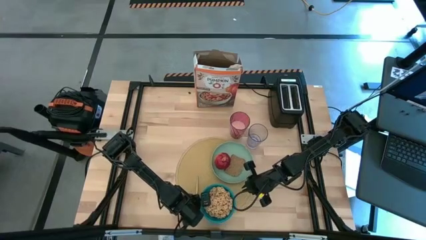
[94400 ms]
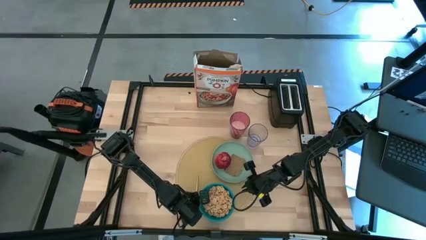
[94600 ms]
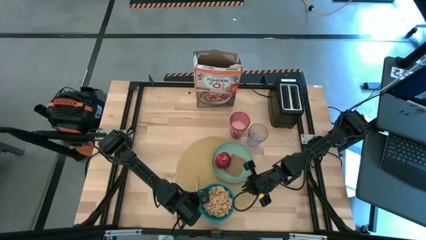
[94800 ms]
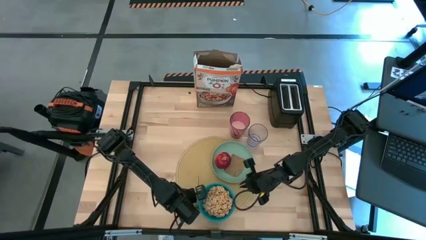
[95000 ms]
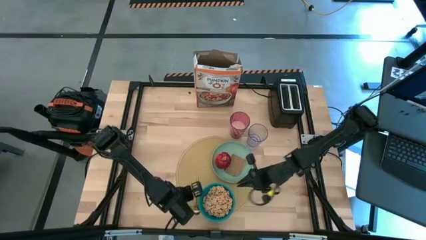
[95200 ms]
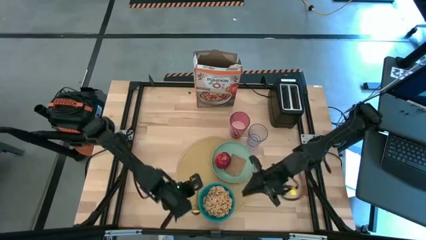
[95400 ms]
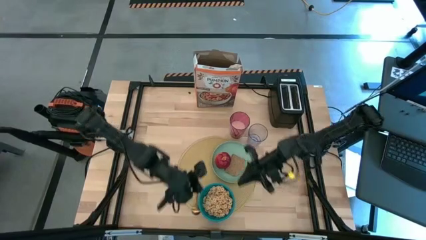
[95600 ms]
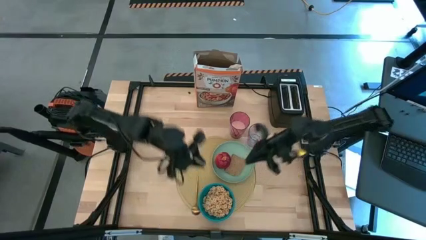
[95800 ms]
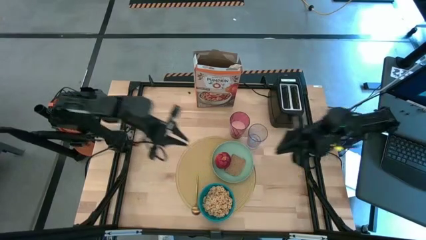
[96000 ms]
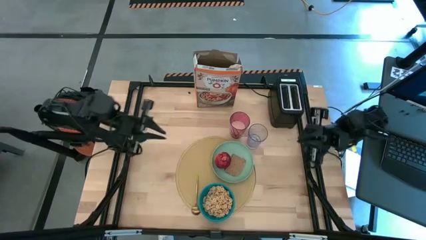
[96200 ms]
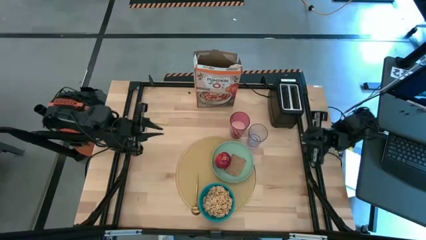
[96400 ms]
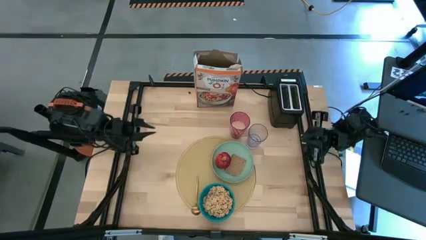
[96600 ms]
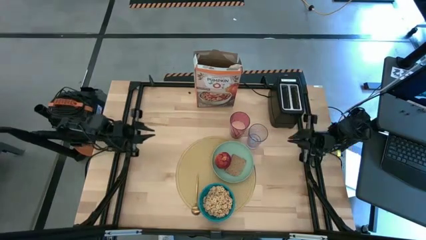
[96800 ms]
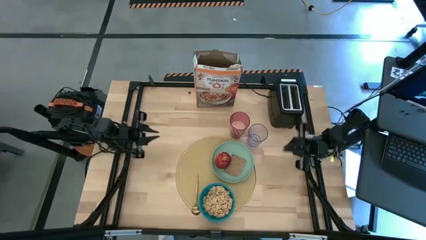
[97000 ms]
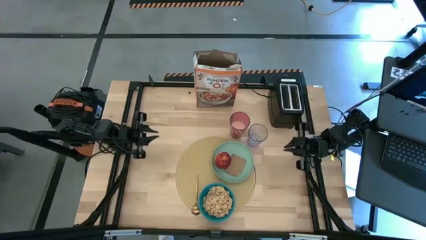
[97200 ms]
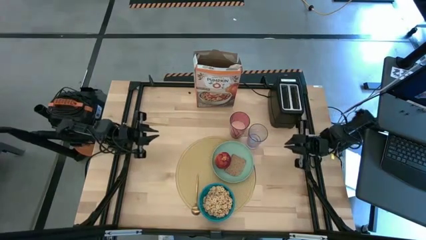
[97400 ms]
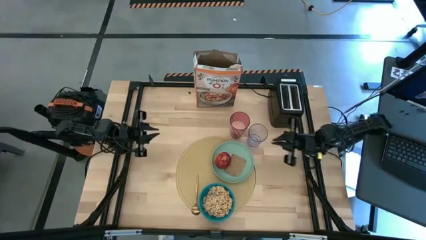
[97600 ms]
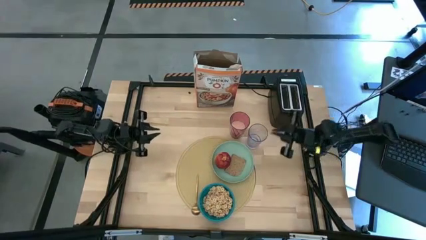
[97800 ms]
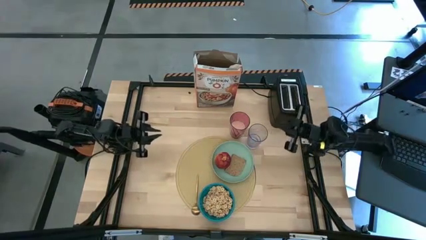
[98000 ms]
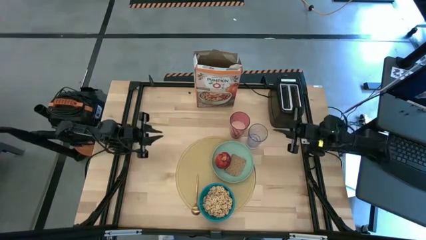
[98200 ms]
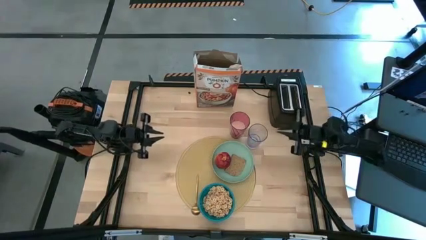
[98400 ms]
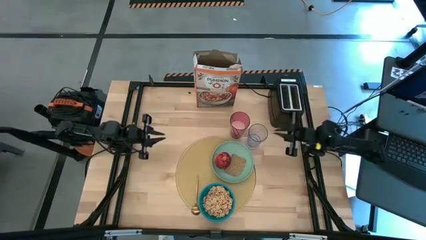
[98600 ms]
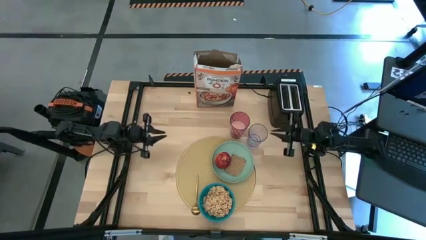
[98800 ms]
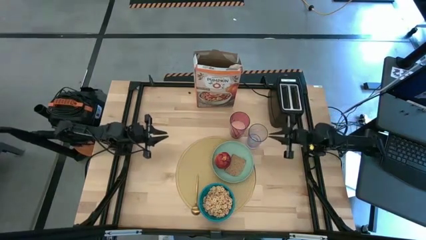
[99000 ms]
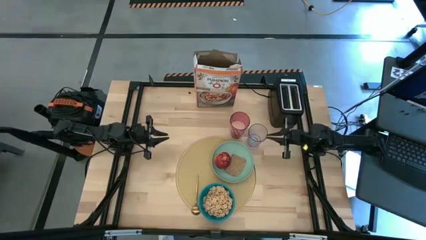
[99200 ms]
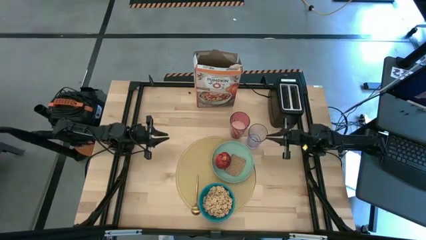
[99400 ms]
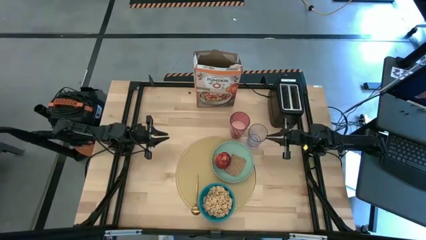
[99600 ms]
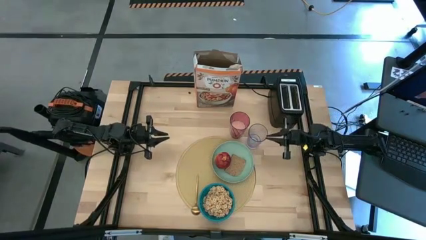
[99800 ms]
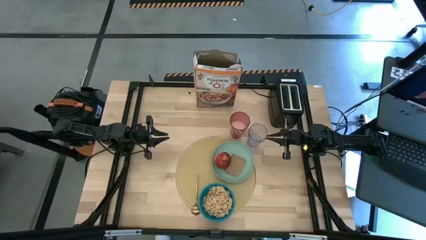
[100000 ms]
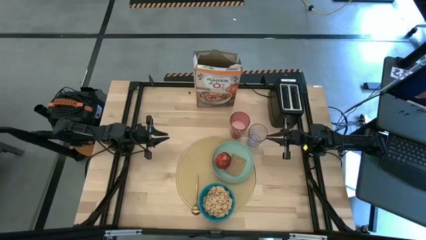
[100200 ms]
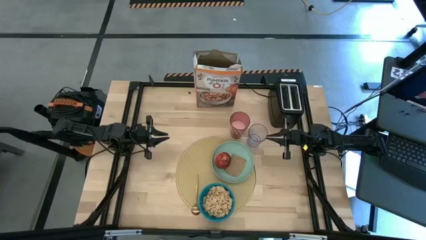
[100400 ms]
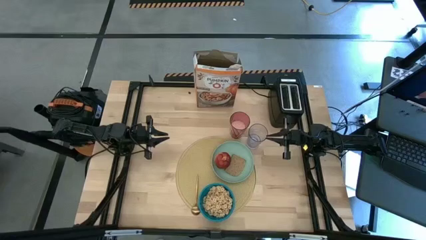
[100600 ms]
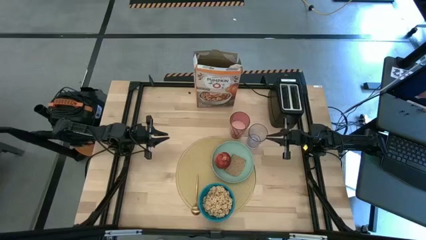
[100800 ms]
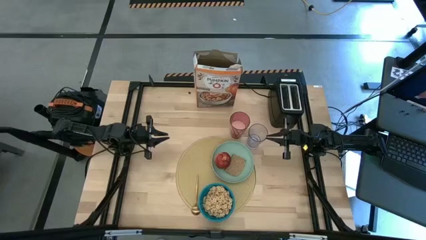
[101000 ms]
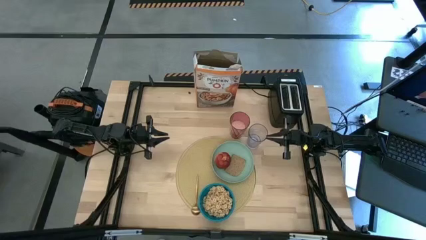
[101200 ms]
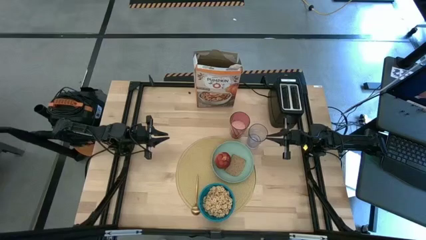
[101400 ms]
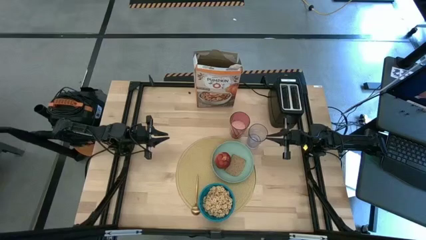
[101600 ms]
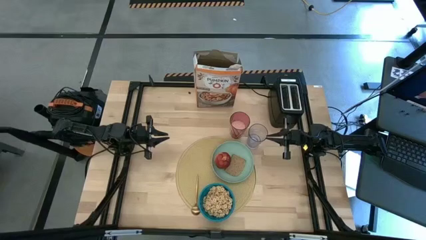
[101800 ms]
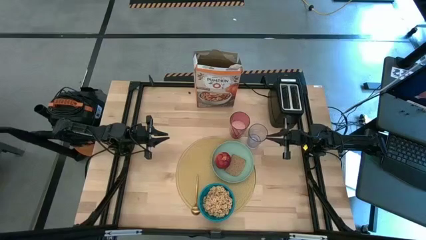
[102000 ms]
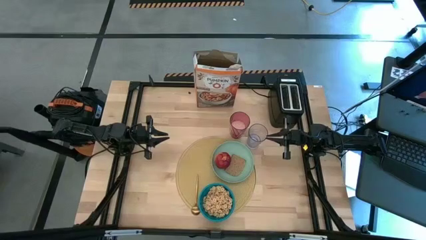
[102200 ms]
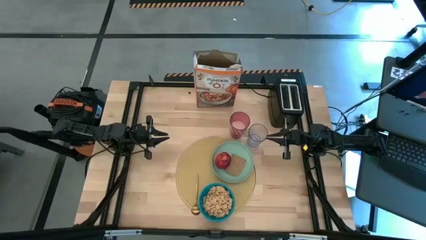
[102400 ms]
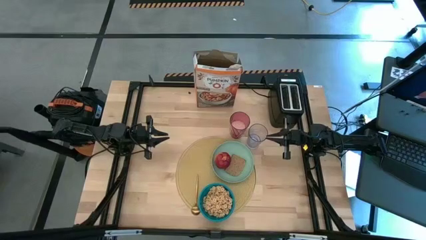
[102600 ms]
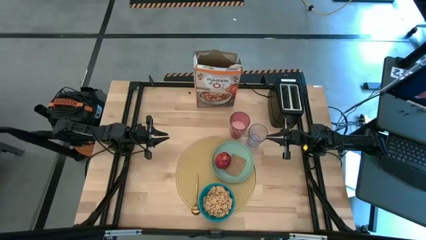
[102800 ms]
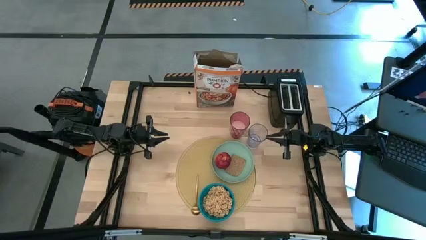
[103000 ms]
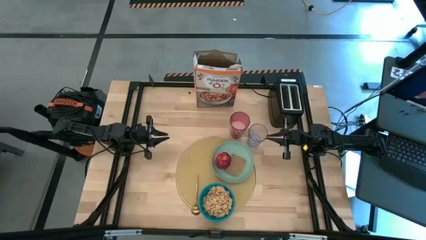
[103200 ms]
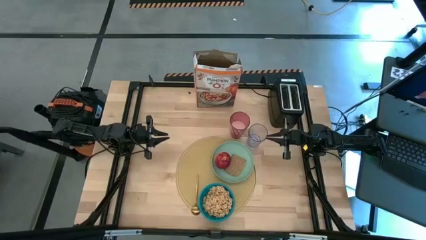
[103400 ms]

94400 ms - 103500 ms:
Task: Arrange a breakfast setting
Return to Home Position

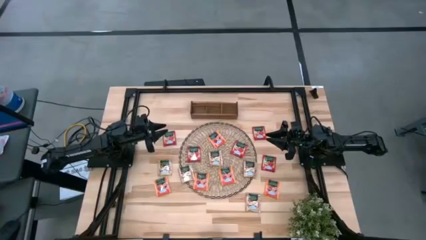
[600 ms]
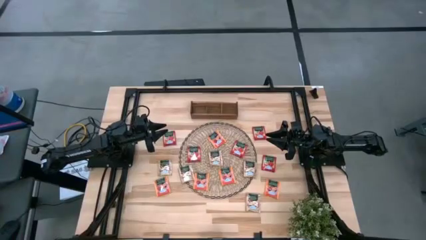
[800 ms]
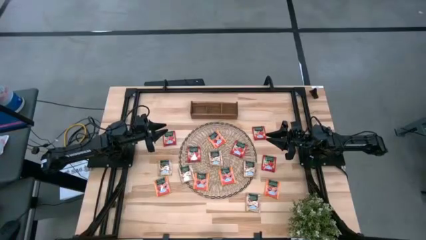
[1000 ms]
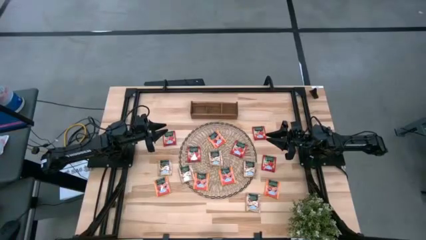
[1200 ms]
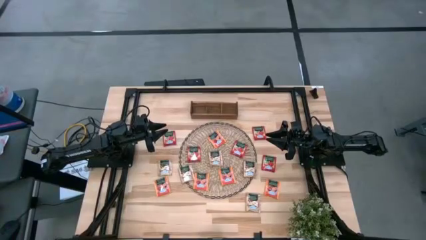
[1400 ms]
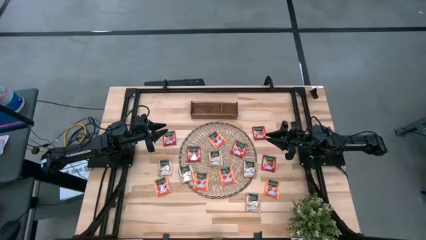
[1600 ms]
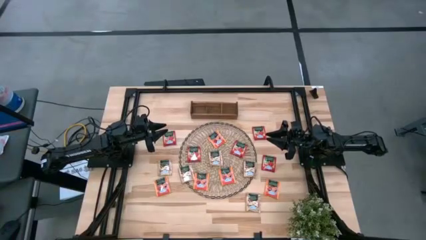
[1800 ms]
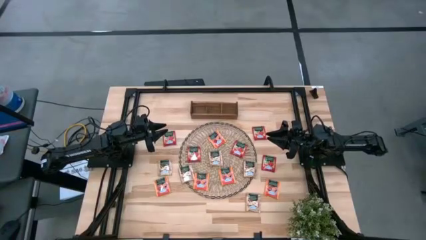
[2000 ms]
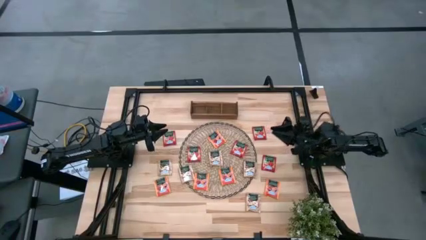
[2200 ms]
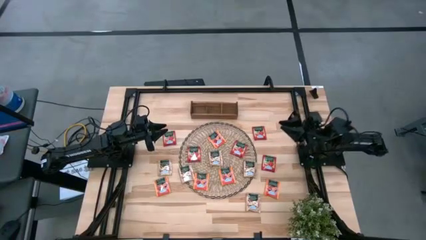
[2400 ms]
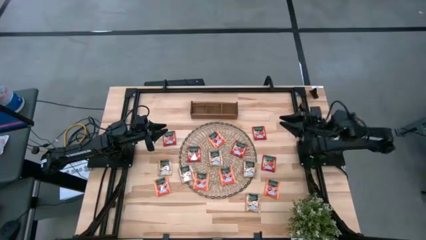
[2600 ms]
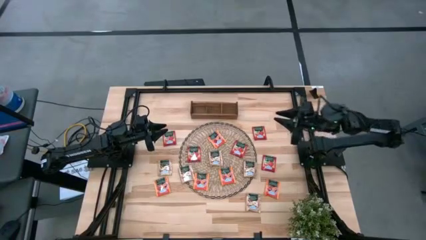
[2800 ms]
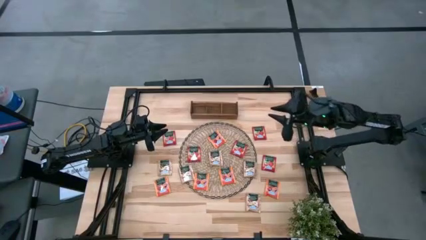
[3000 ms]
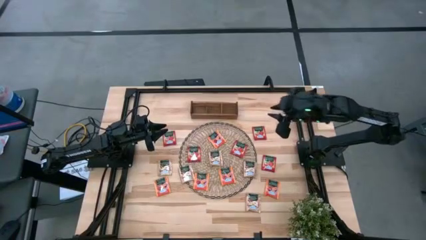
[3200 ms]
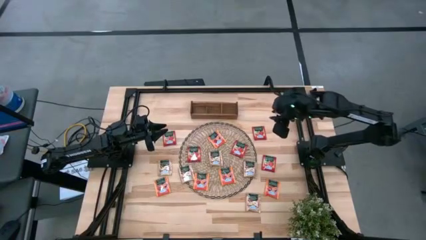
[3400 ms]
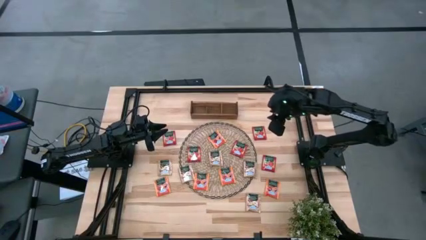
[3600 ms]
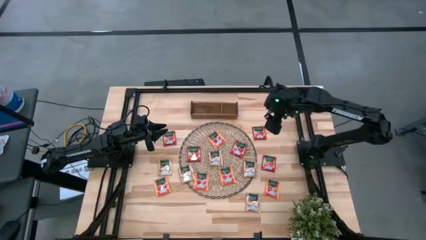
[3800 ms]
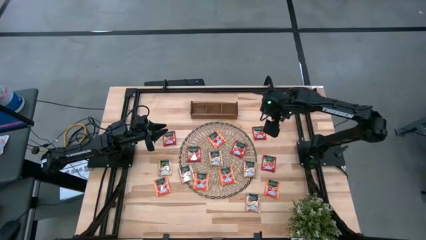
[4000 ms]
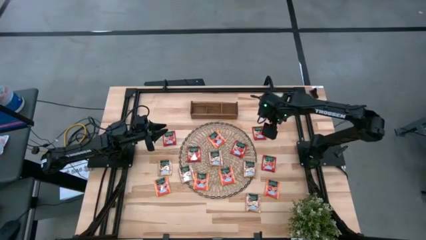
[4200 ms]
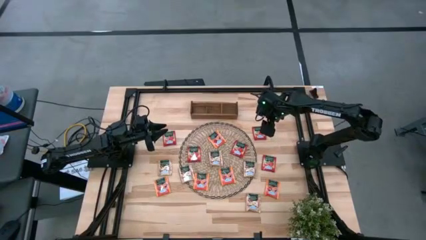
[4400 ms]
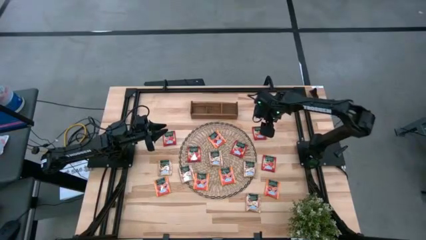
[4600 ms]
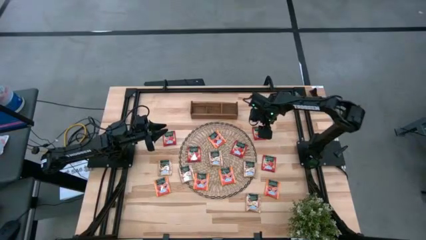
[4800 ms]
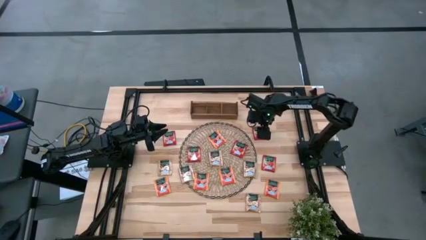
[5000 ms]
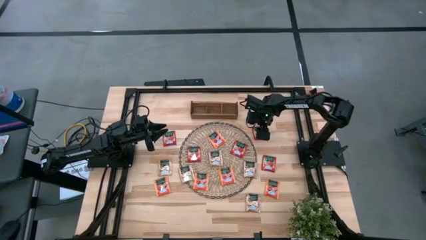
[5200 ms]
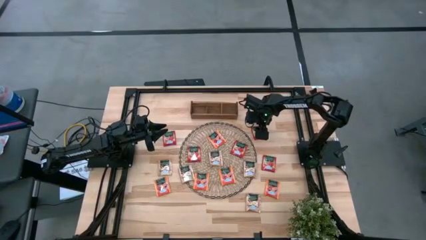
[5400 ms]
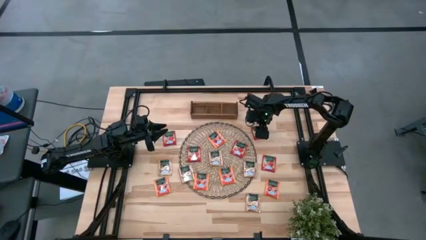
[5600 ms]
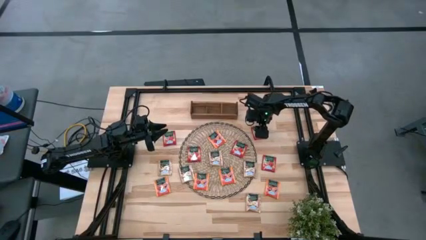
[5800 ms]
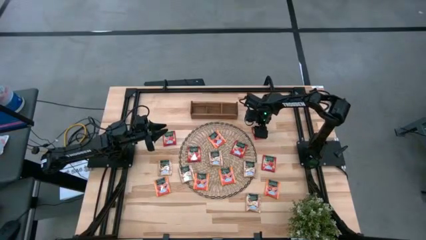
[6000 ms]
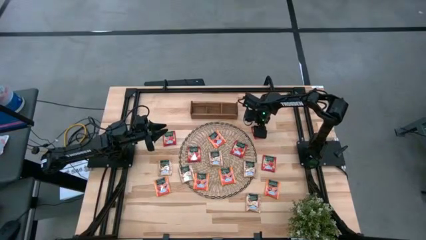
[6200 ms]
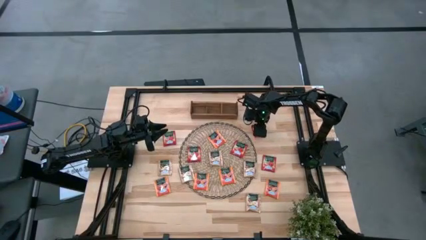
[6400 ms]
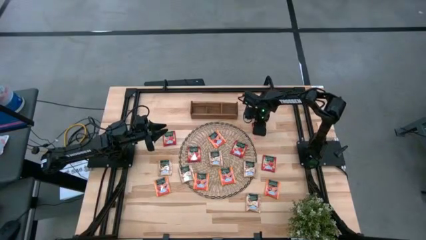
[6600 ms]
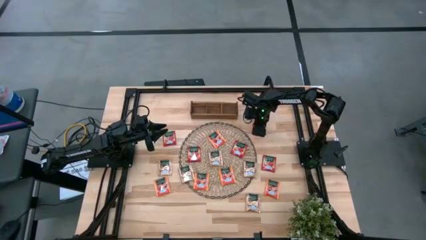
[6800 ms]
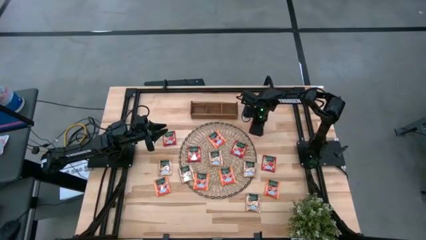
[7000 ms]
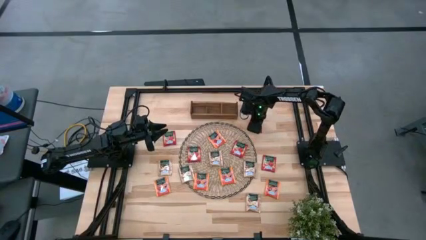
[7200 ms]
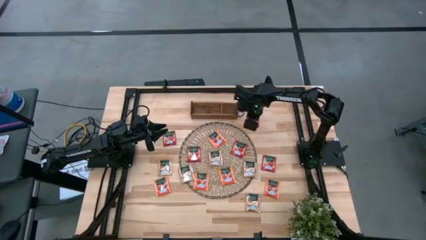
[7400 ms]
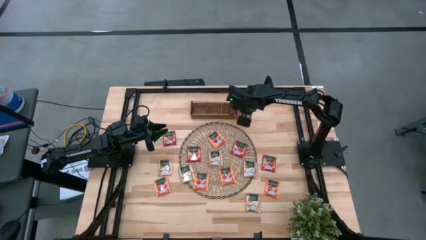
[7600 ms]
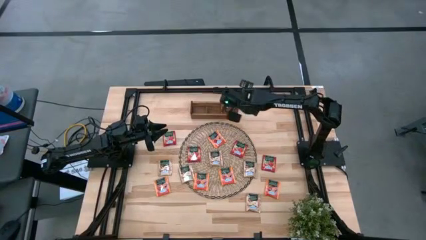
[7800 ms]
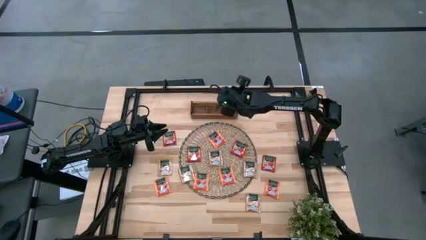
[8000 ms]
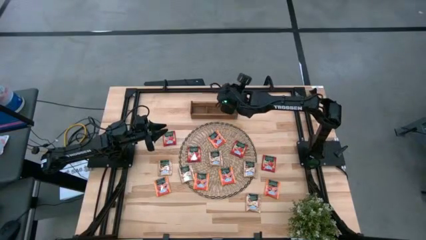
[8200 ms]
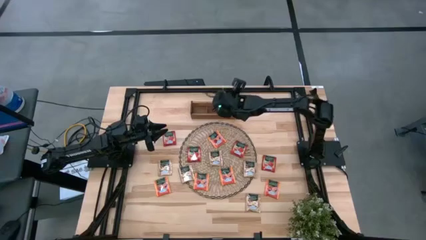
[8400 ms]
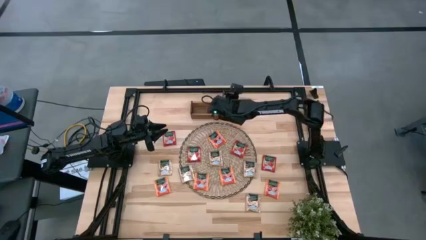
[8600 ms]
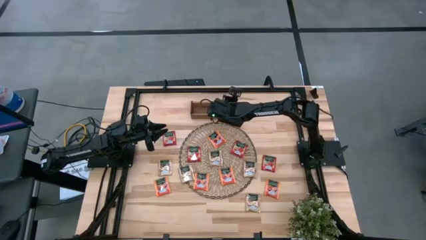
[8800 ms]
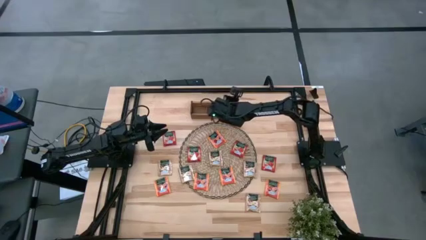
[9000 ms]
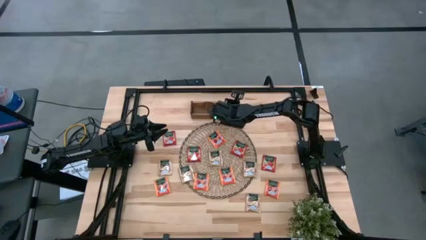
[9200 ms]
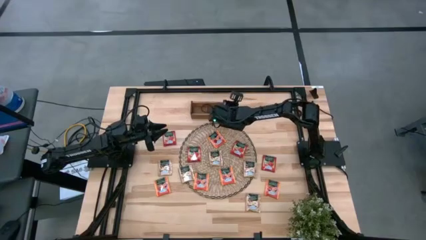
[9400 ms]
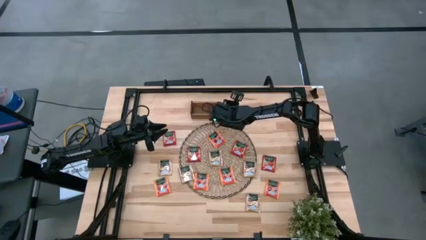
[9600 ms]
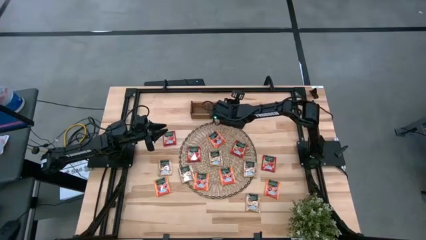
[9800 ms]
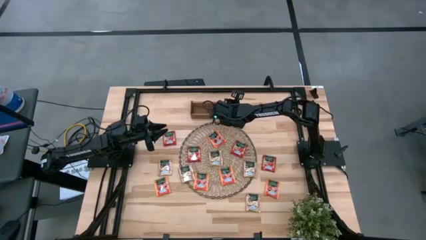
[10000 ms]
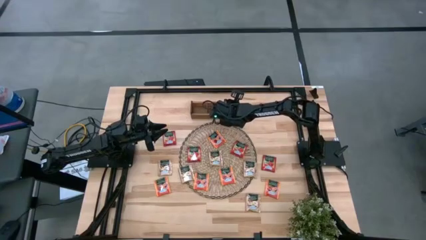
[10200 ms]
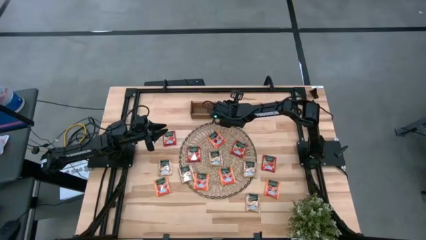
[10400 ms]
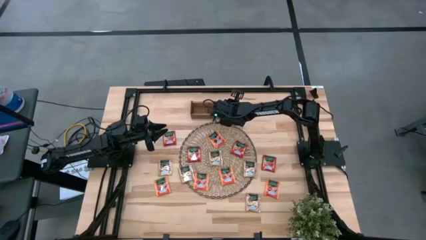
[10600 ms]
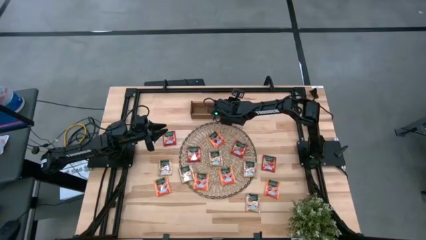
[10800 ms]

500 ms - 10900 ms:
Task: Pick & Place Tea
Put the red tea bag into the right section of the wooden organizer
